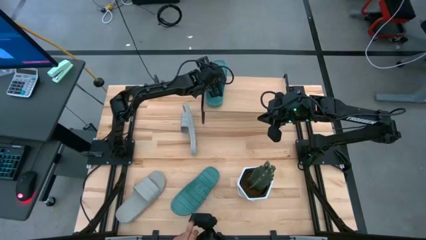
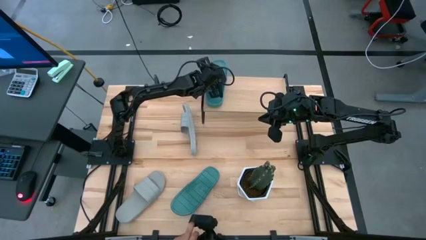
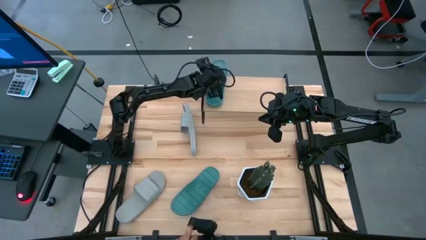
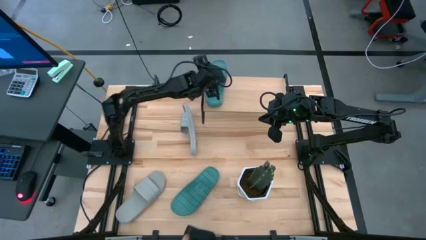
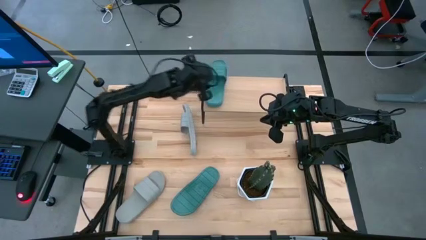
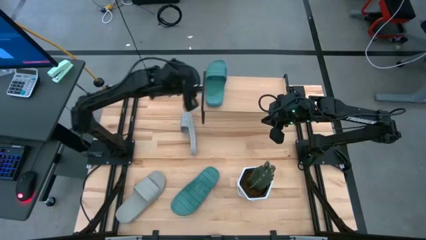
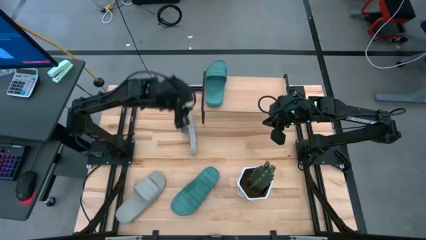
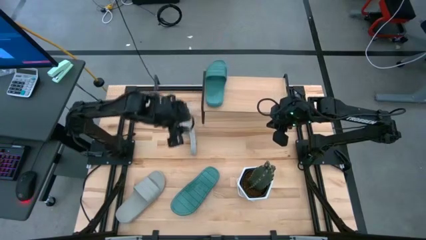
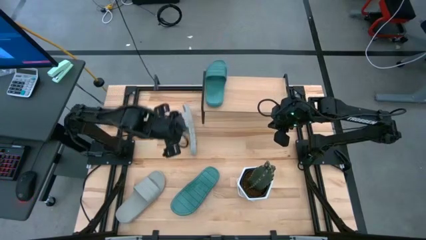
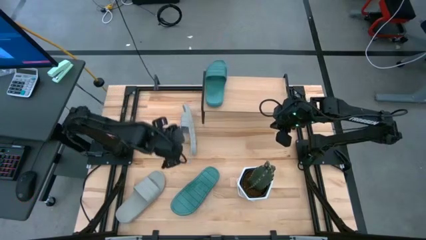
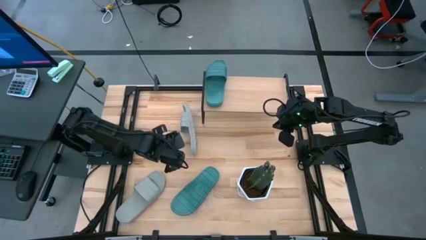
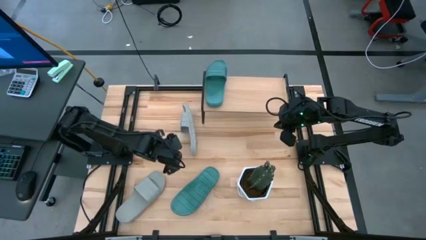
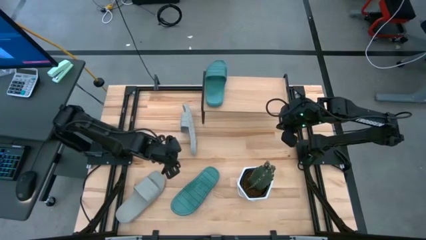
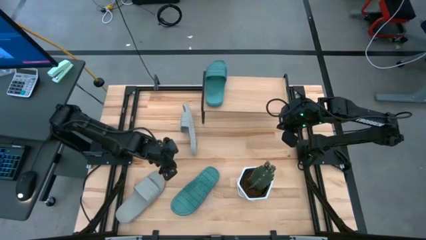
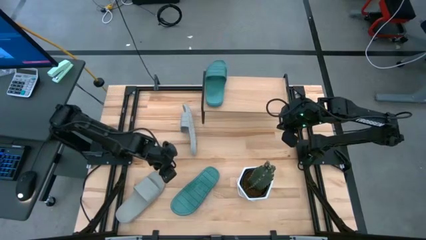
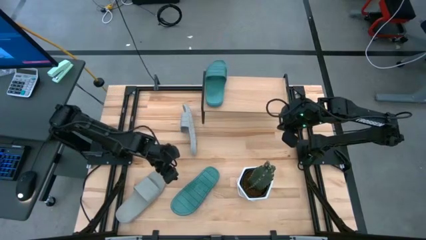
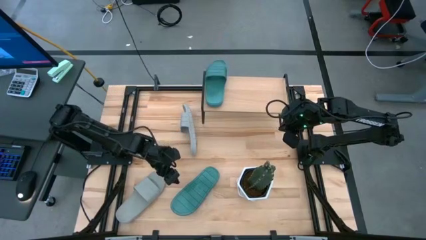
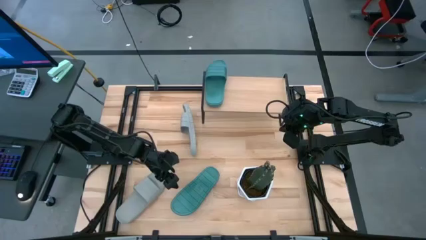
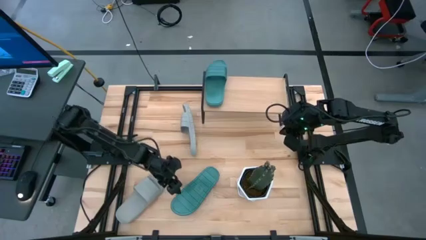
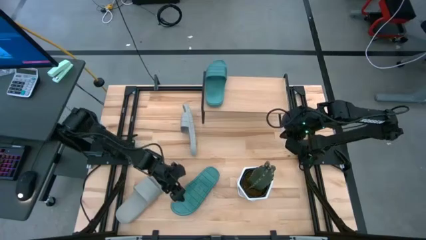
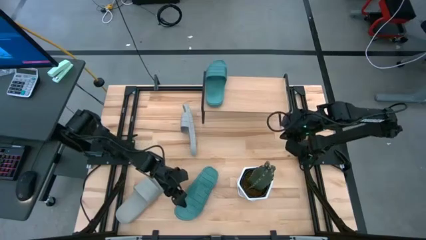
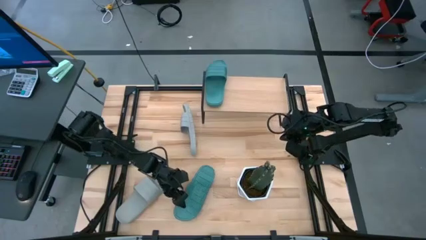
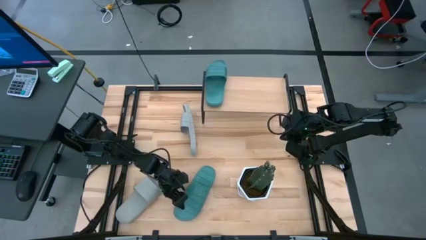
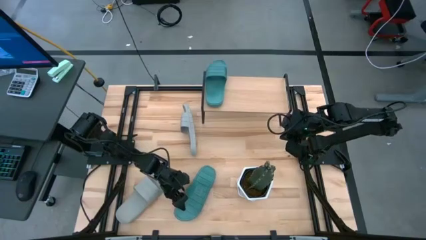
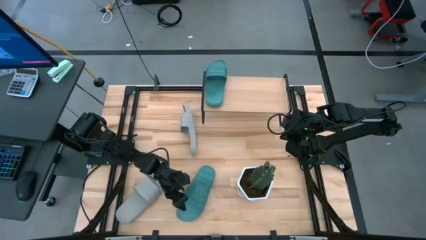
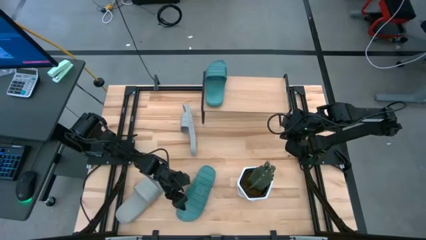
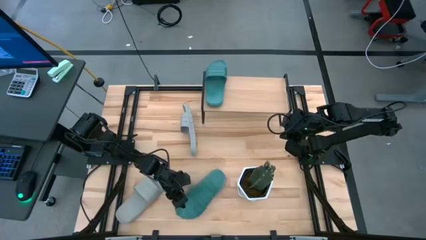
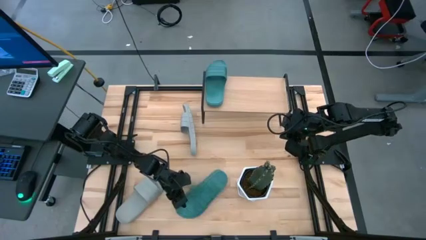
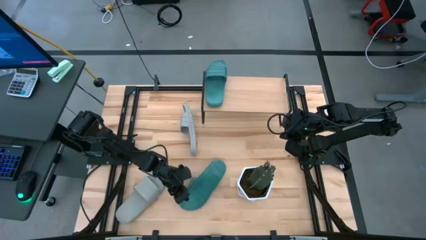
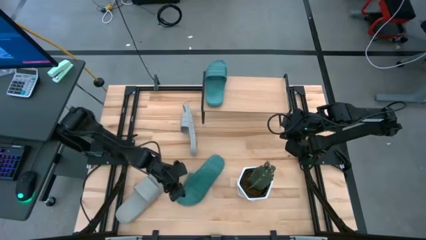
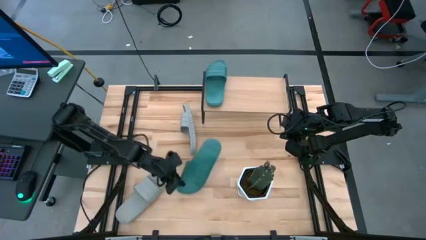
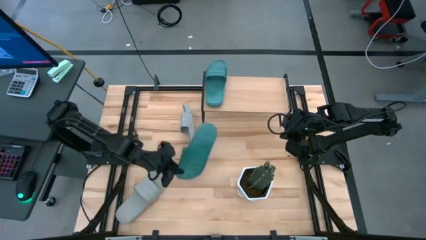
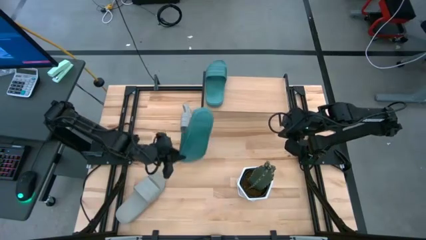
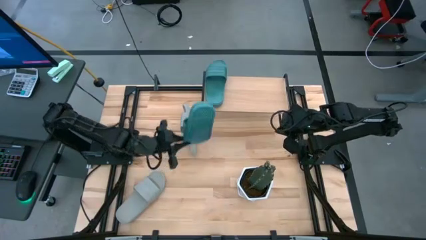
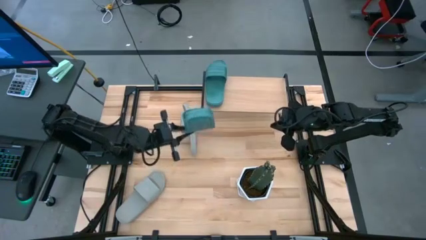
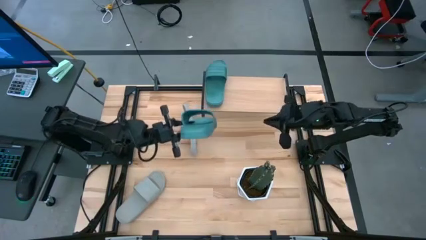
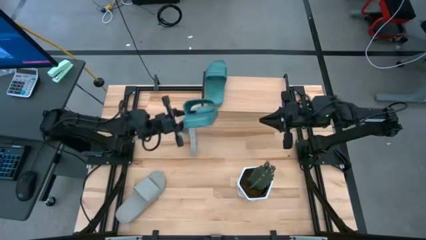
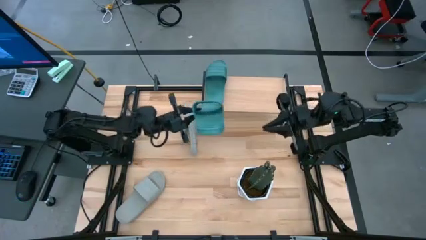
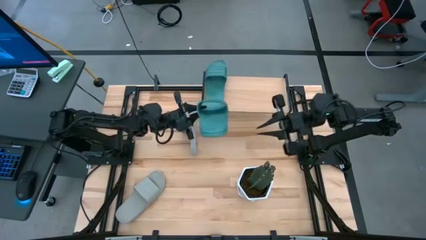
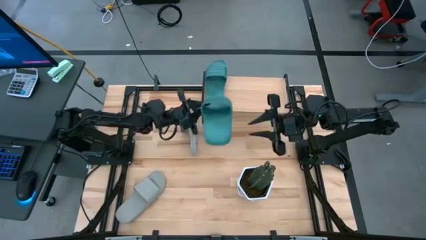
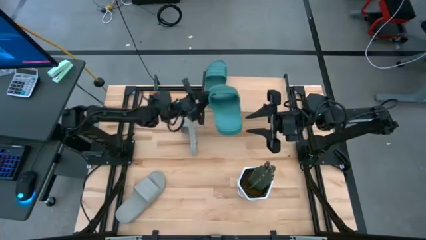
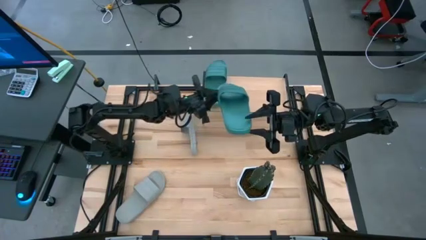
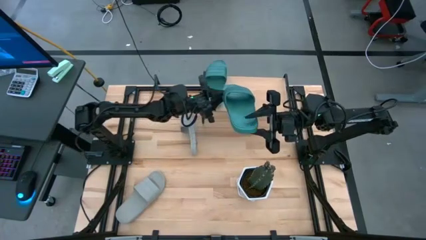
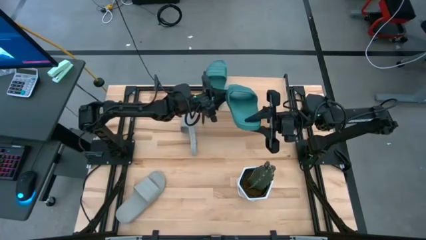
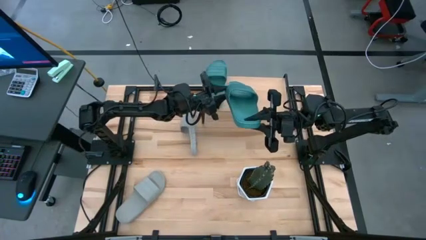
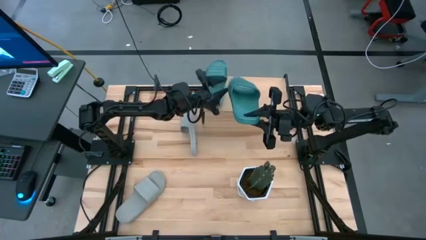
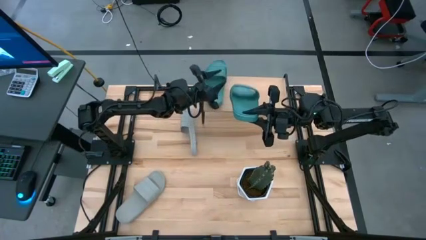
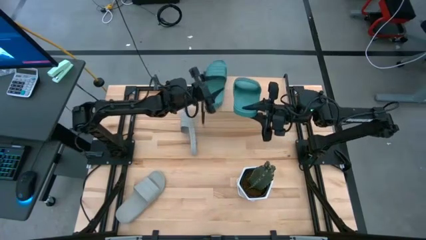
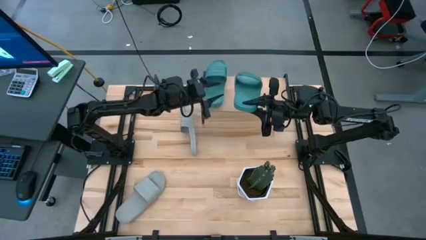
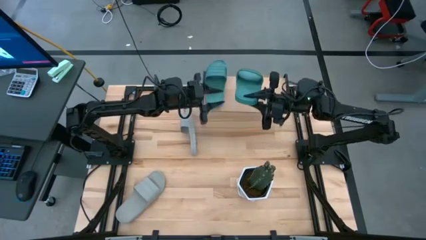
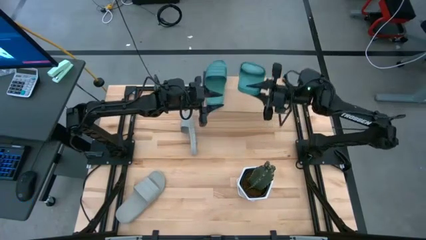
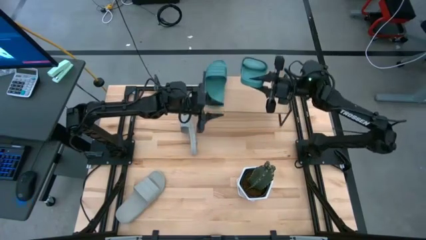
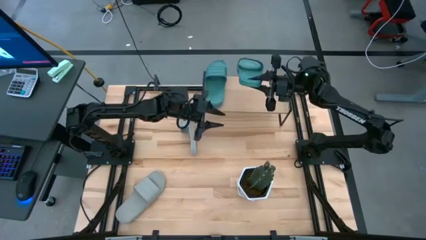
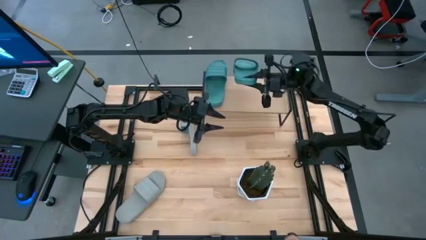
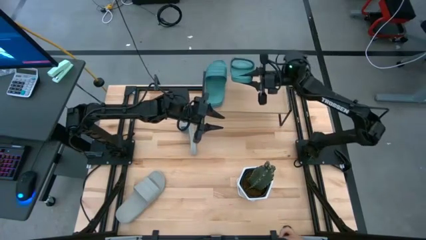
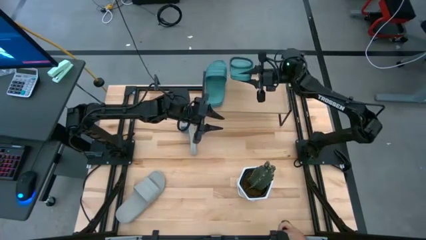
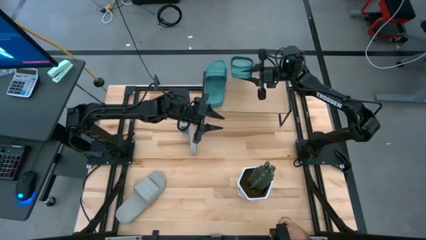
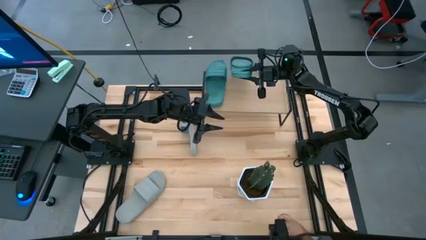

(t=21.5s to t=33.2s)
Task: Pick and place slides into the shelf
Put the green slides on the shelf

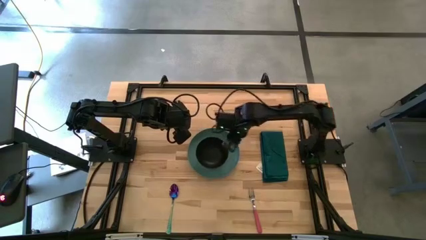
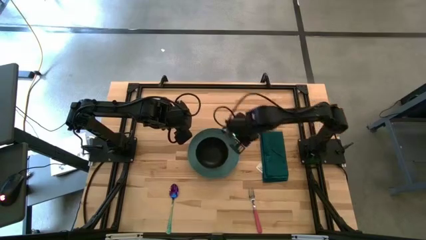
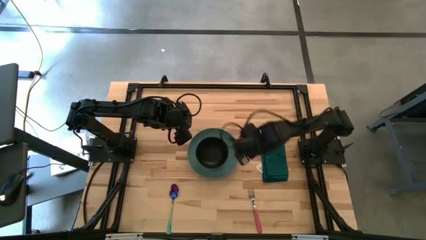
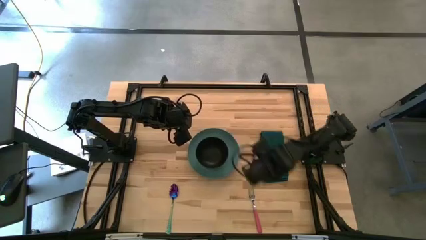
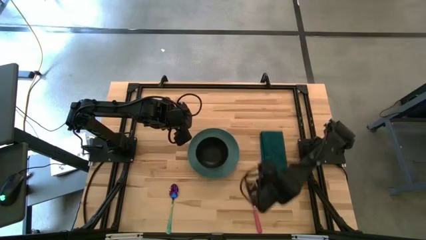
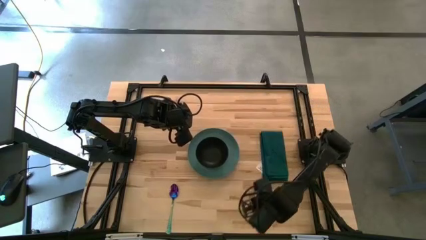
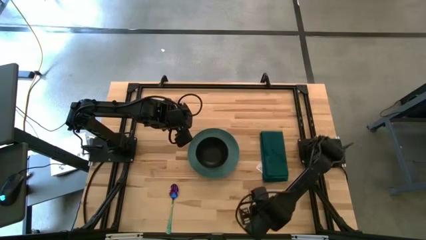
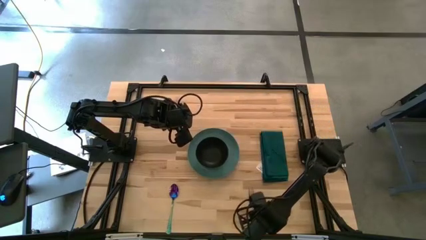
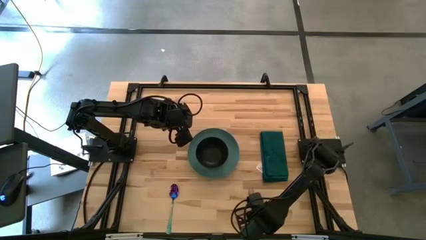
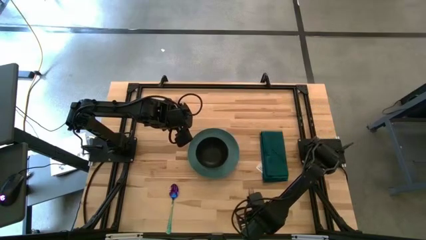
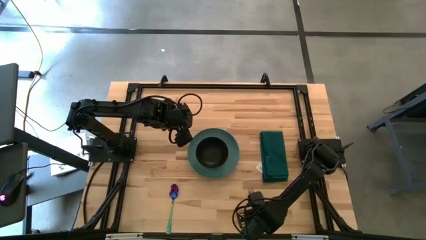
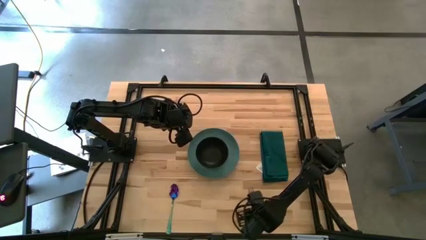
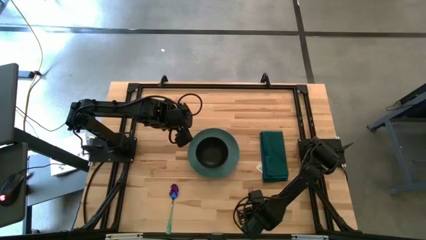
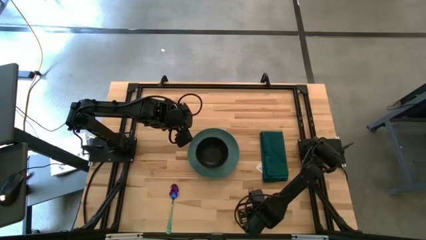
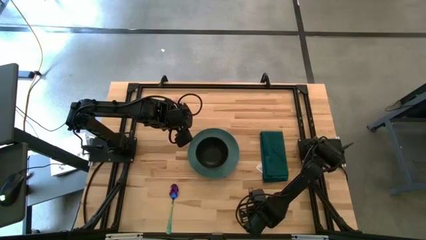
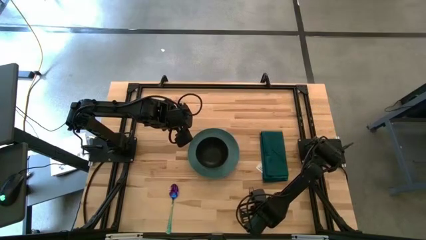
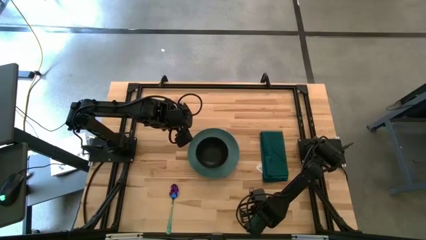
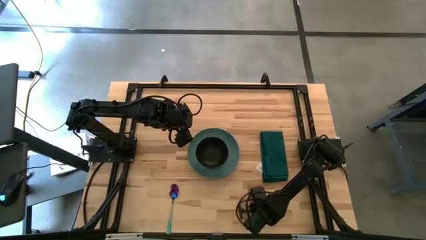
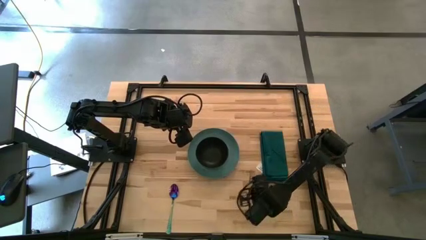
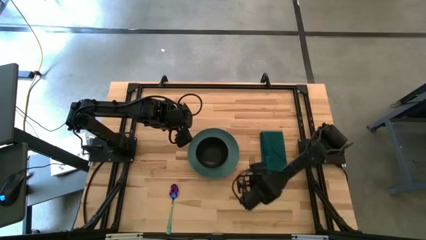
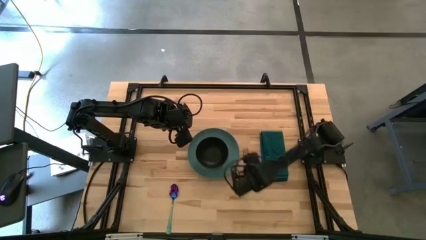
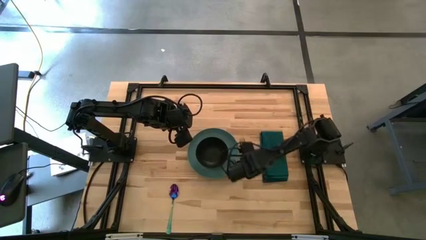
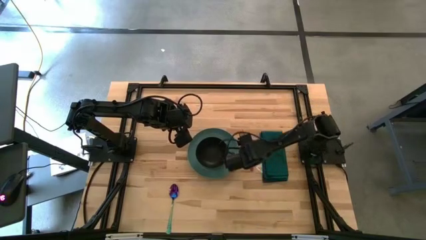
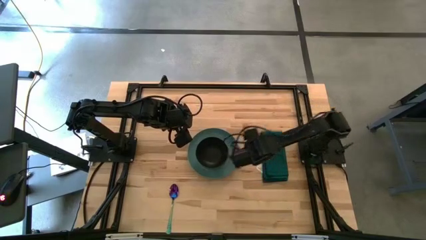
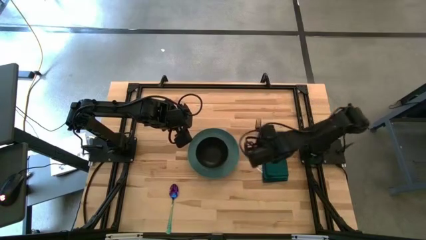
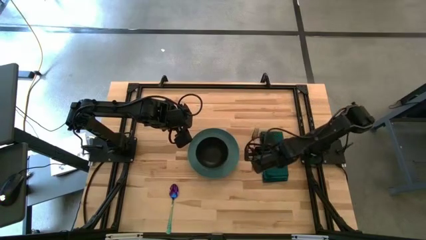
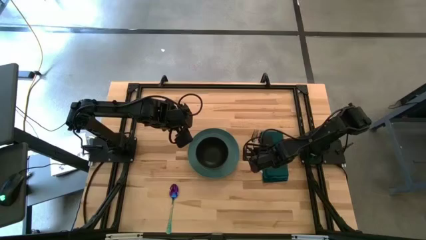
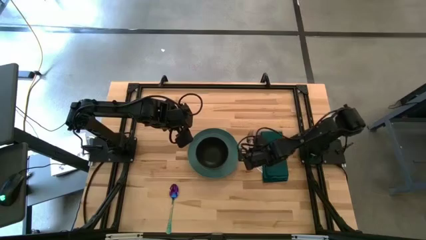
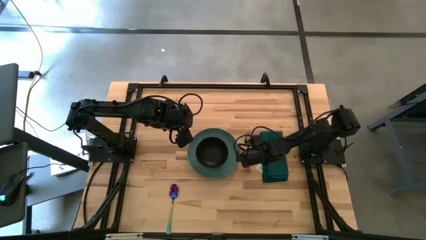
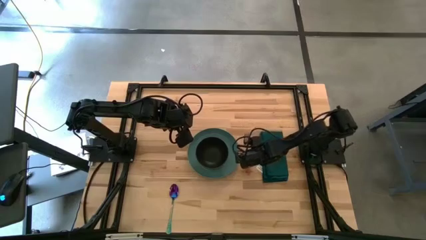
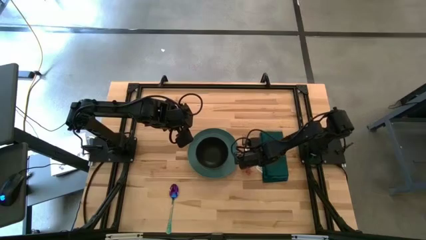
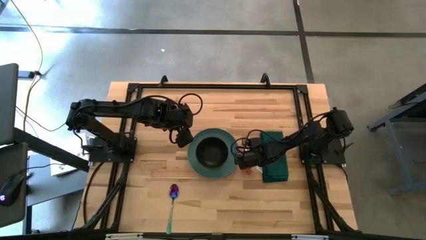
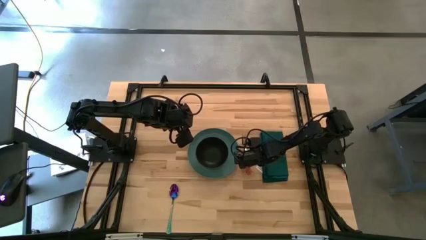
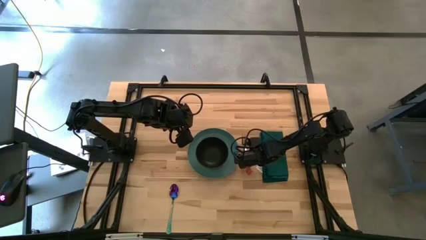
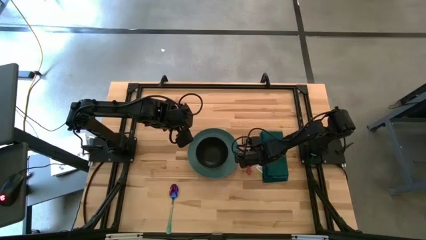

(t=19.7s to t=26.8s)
Task: Set table place
Move the pink fork from the bottom to the right between the green plate and the green napkin on the table
